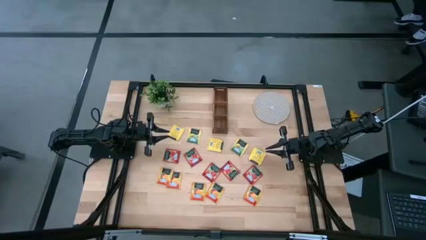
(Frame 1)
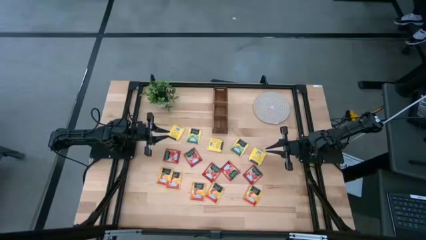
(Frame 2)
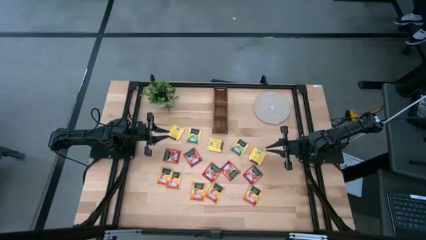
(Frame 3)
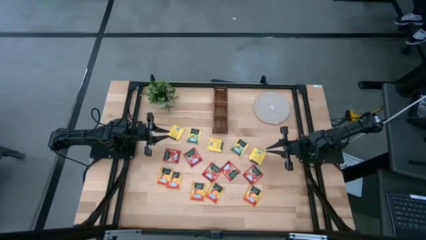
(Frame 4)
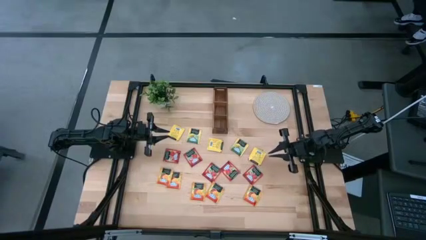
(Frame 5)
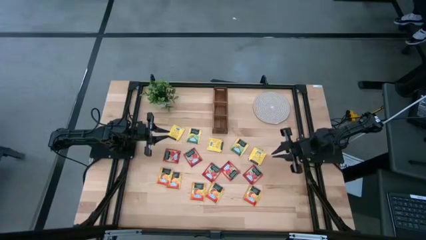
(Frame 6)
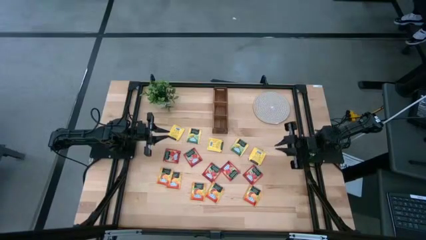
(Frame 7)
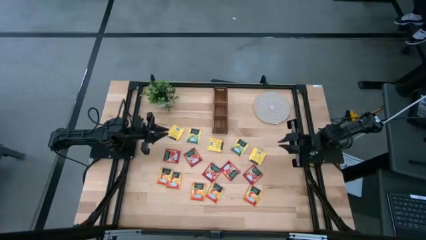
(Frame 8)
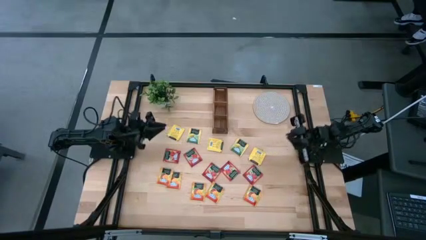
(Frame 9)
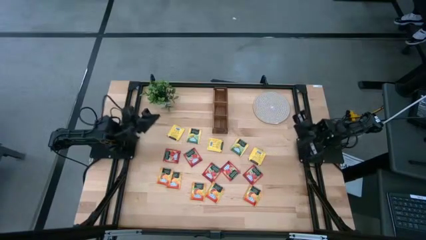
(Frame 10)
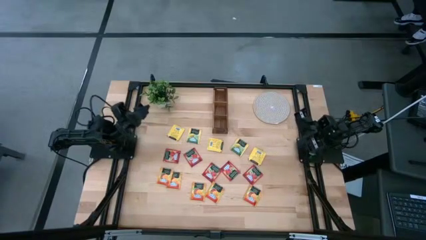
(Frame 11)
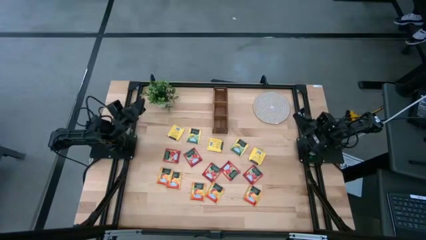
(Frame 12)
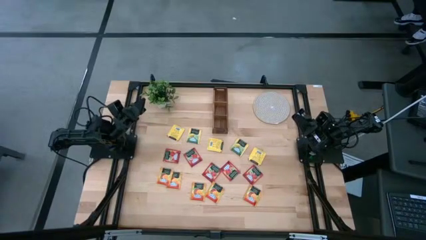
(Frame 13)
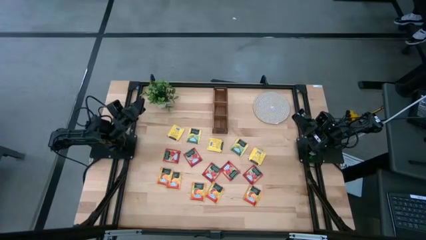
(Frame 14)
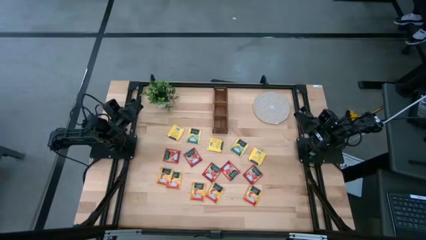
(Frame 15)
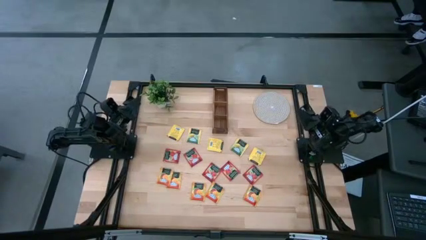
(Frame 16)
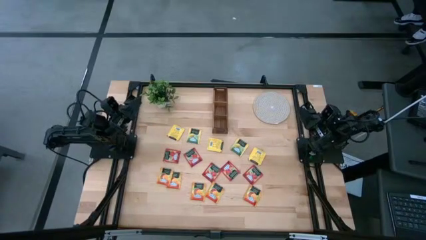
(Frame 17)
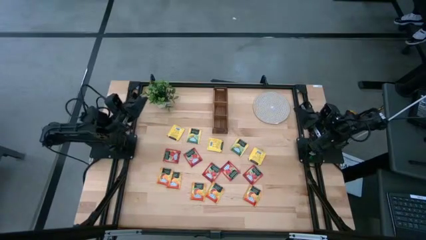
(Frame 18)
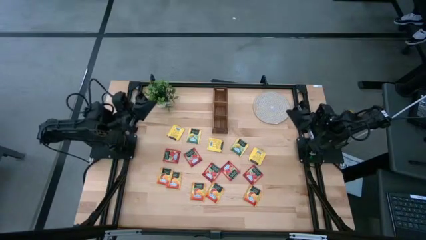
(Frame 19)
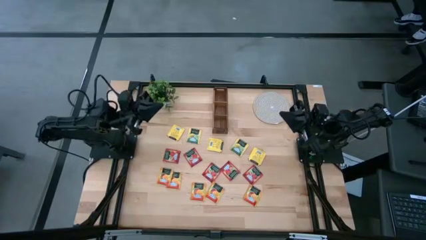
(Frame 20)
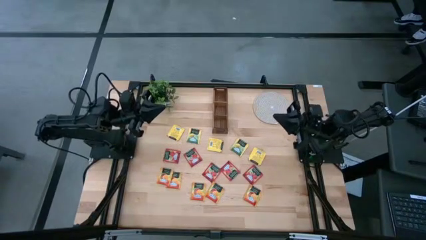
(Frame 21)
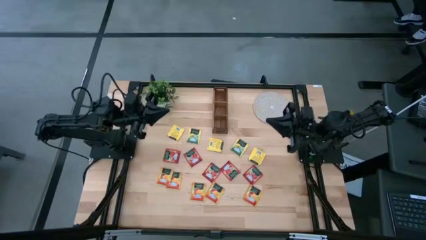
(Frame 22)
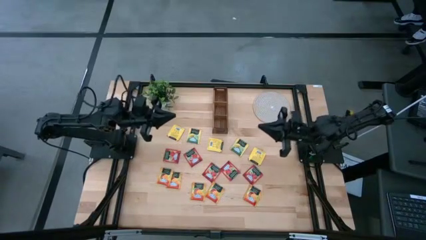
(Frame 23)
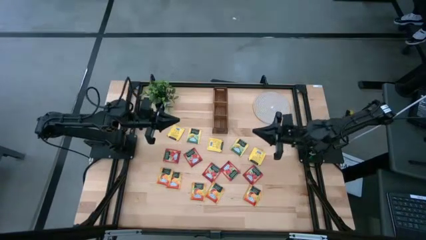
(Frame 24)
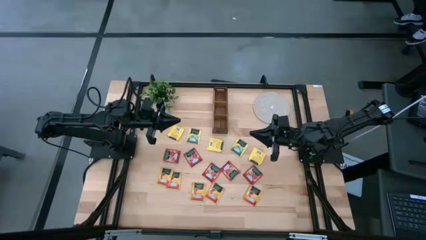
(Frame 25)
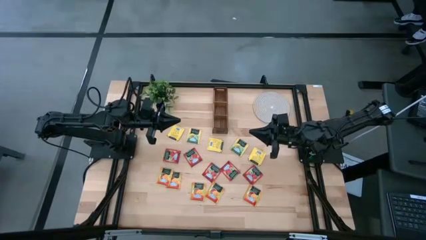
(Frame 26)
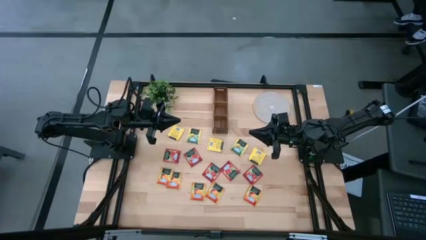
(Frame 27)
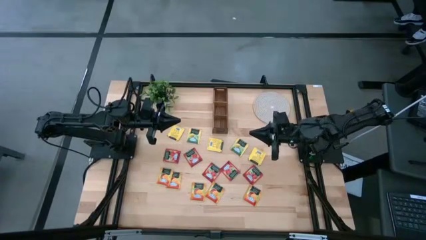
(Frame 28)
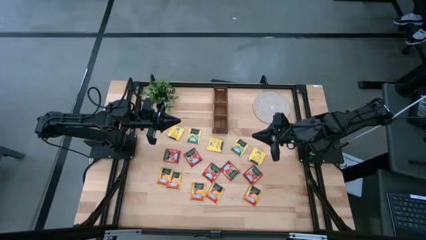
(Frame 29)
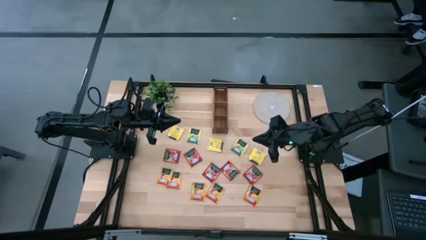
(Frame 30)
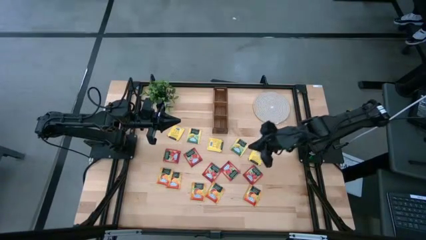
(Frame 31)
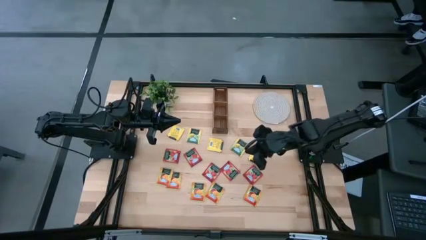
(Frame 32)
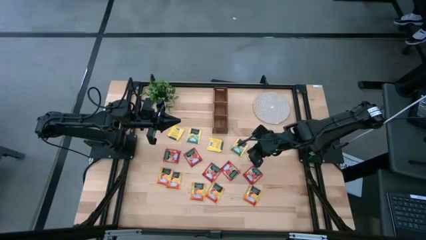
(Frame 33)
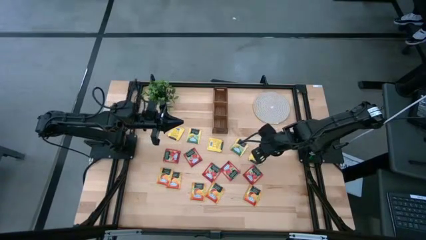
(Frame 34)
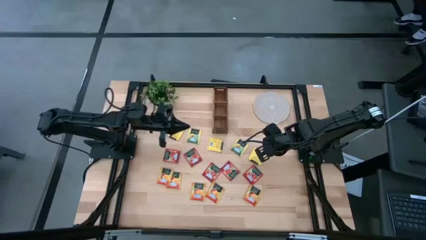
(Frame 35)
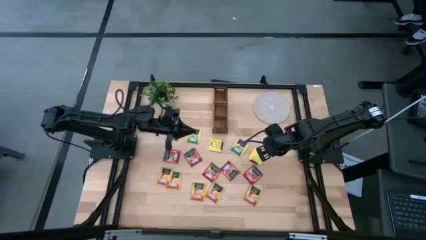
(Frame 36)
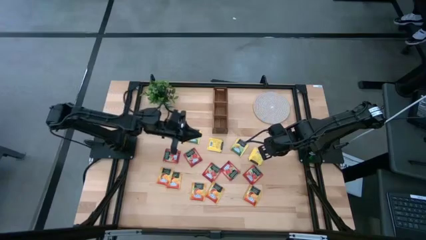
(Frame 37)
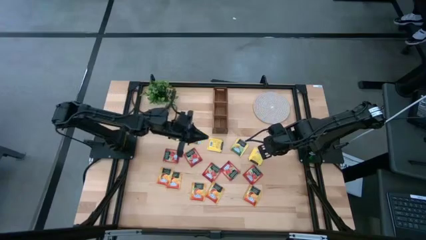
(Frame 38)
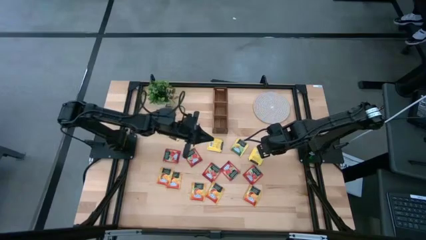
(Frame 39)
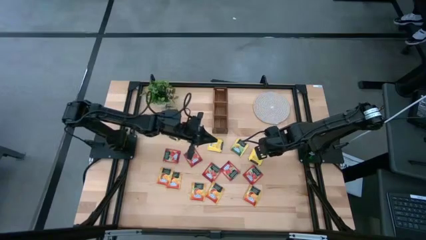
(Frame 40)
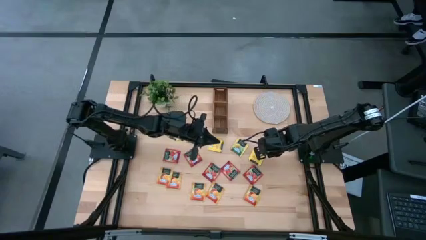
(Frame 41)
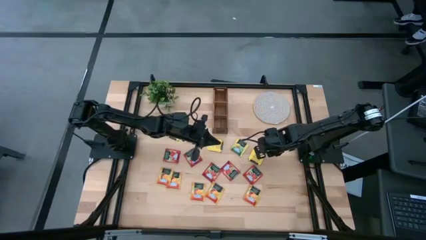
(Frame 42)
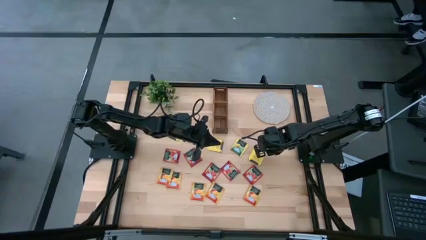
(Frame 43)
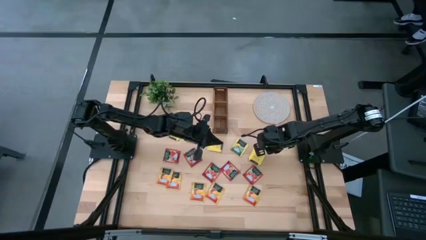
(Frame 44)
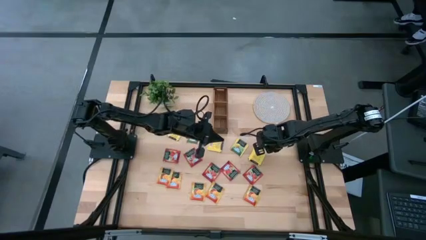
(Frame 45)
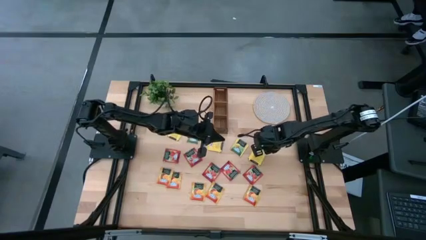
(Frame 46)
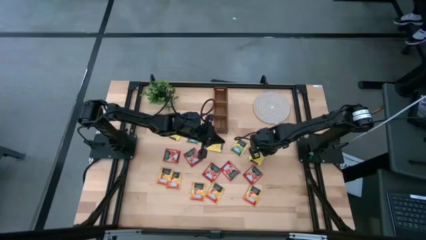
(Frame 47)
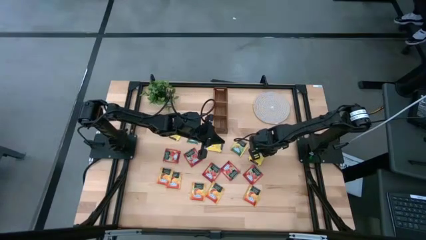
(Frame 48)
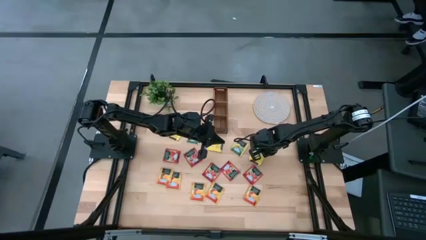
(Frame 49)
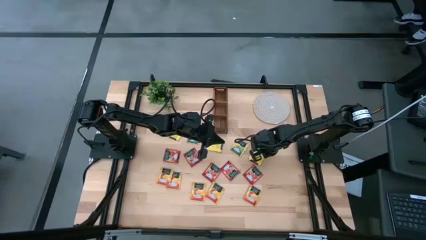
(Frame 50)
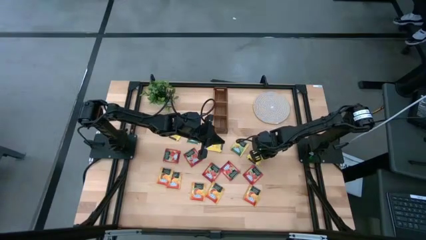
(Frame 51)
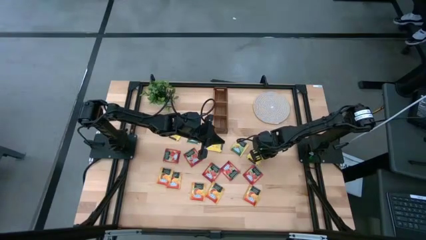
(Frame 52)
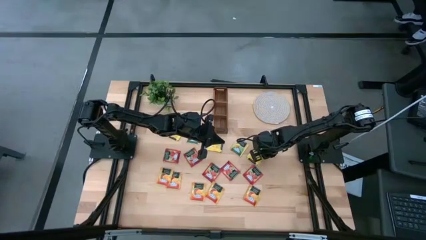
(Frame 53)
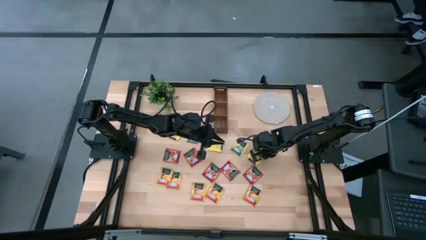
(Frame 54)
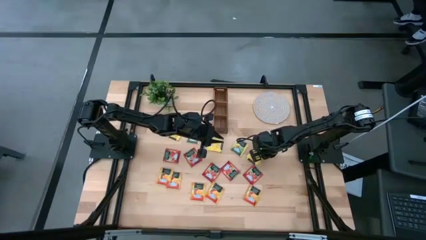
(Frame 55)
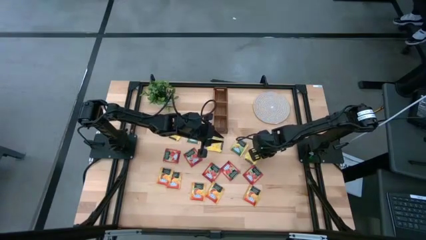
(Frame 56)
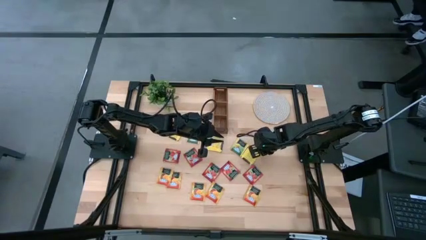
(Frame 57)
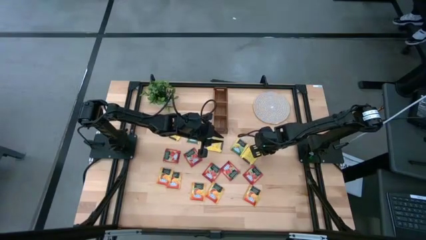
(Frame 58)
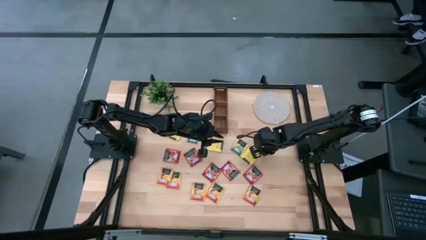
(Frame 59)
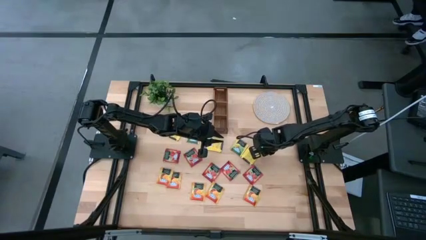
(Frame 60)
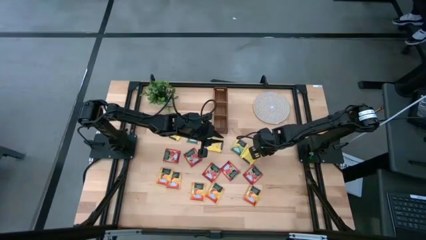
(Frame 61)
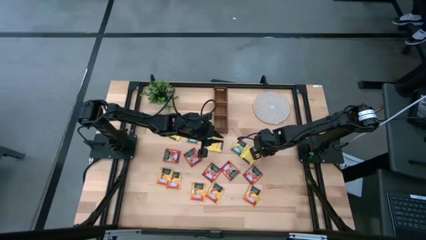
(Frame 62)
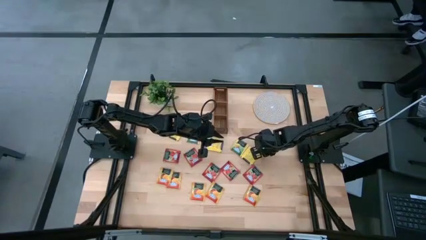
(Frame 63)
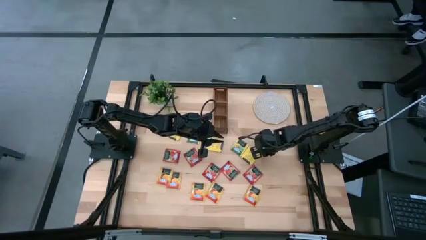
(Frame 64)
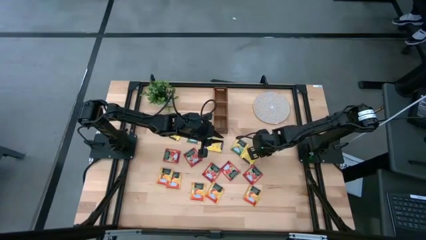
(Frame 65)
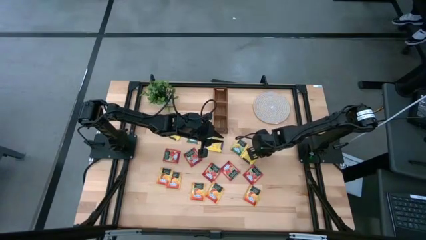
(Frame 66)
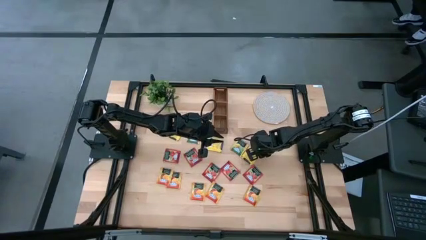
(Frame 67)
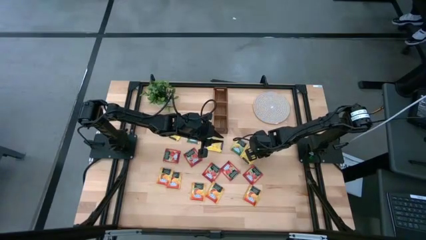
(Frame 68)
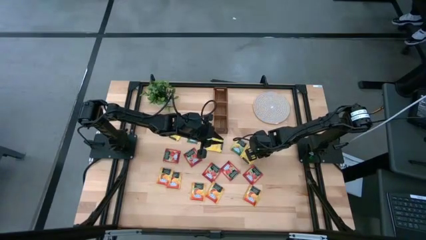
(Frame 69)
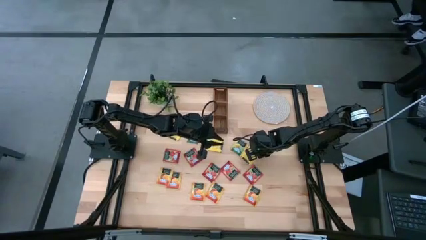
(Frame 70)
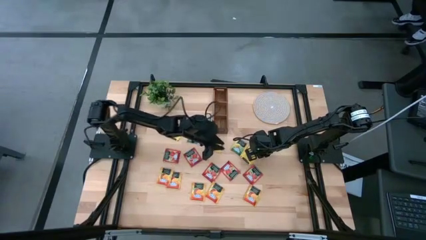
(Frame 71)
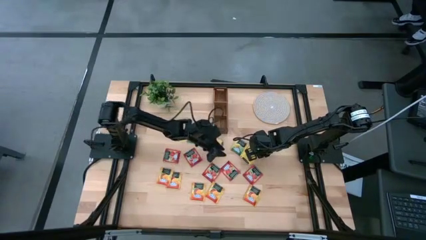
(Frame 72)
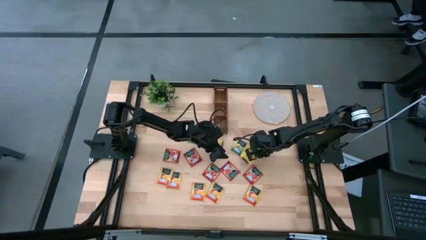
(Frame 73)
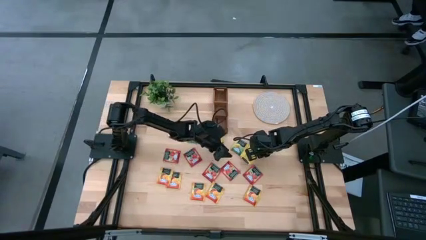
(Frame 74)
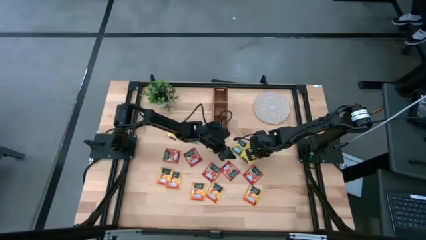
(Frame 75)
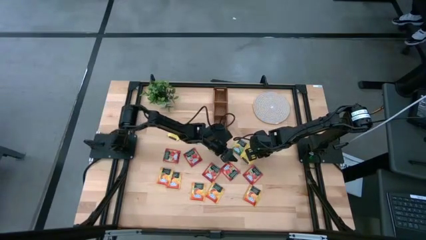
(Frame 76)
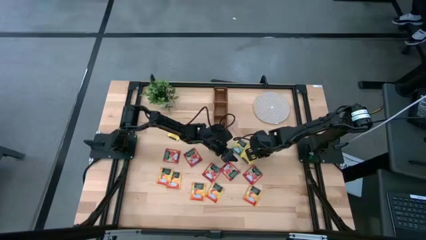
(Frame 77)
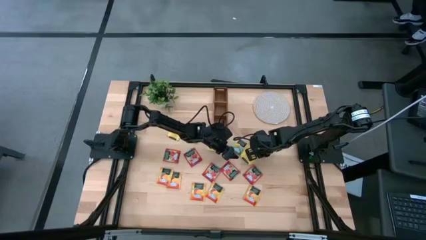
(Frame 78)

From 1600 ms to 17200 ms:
Task: Pick & Place Tea
Put the yellow tea bag into the left section of the wooden organizer
